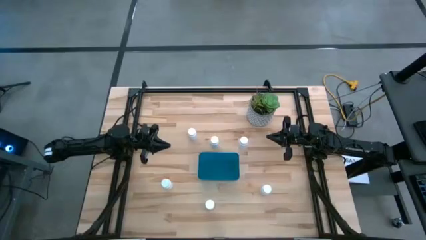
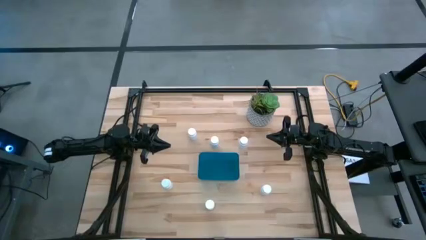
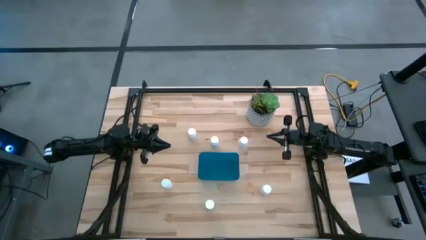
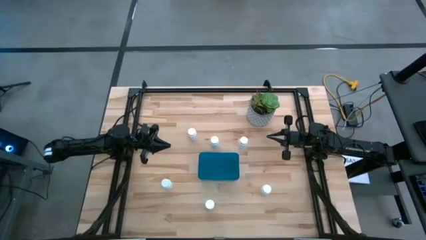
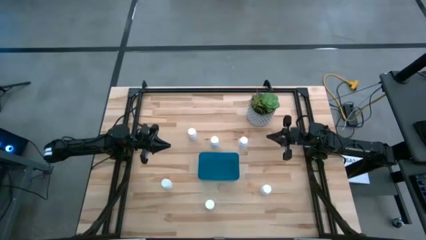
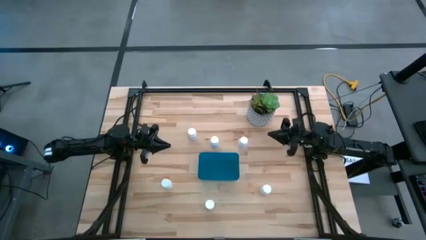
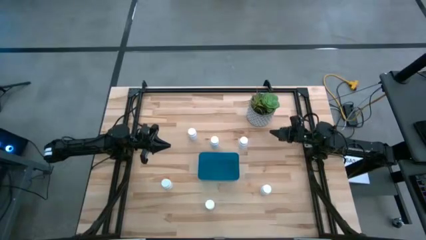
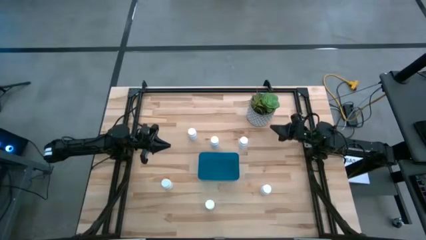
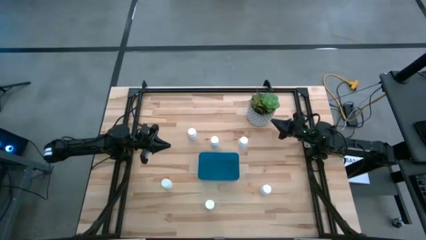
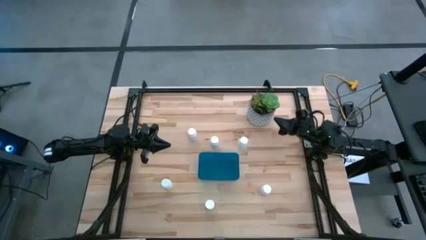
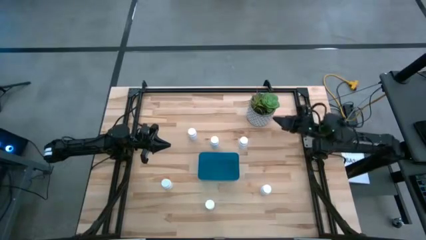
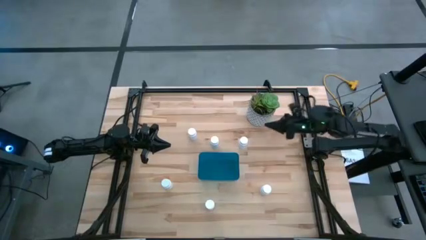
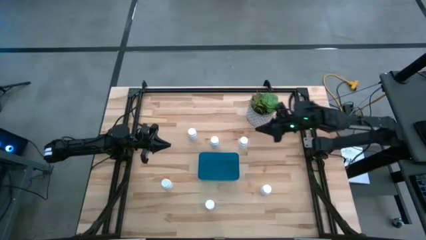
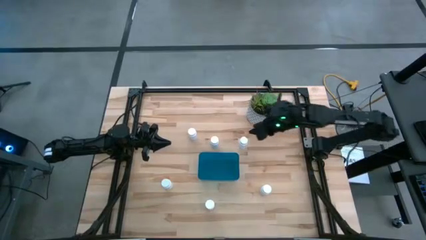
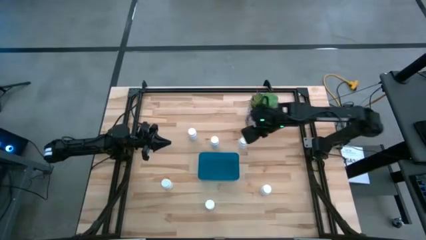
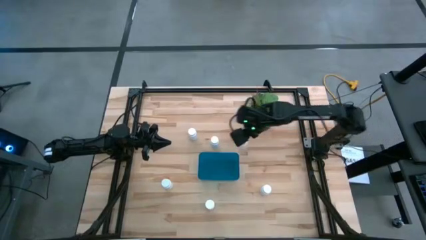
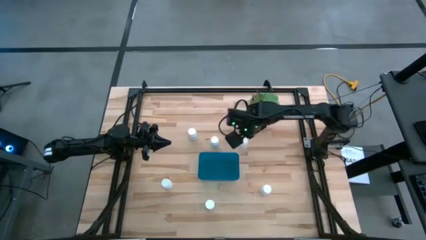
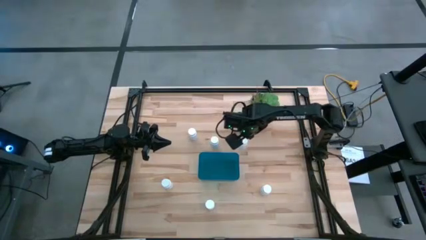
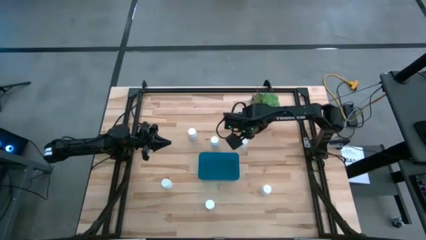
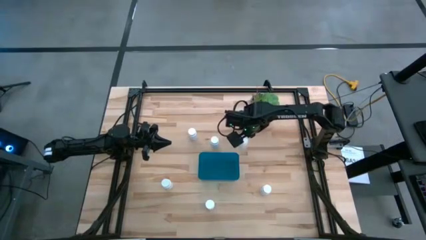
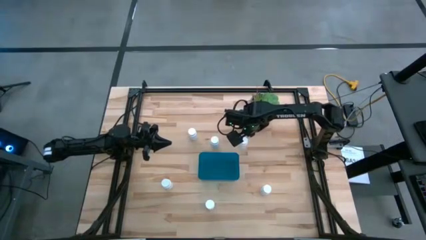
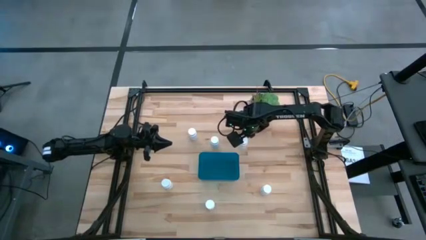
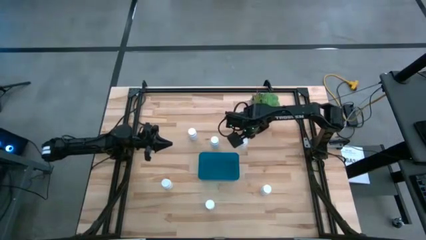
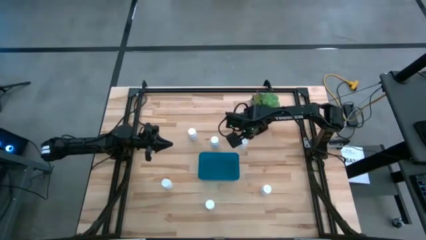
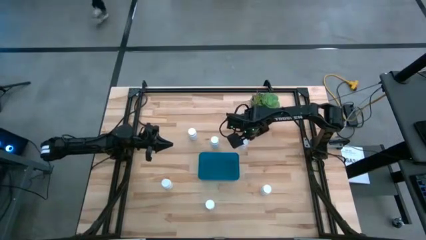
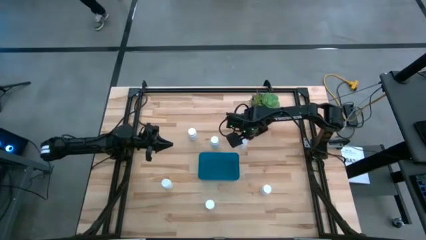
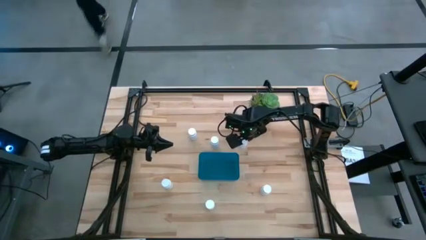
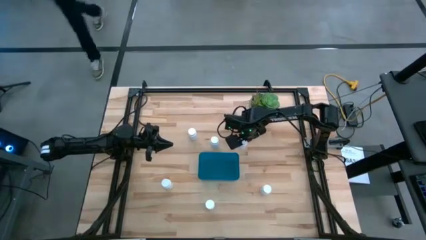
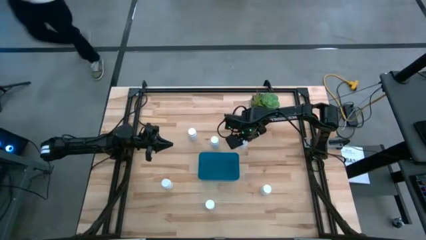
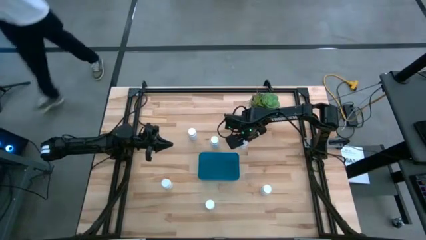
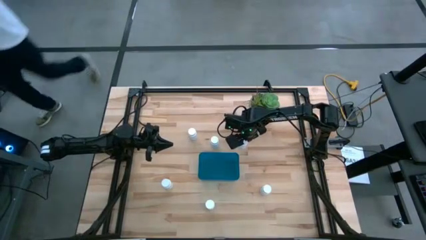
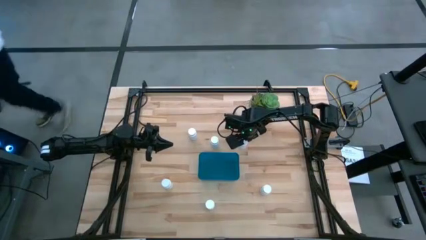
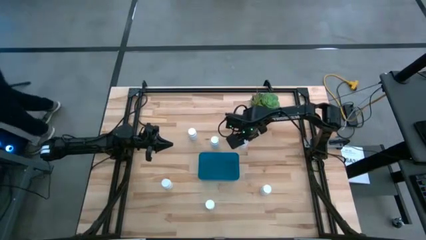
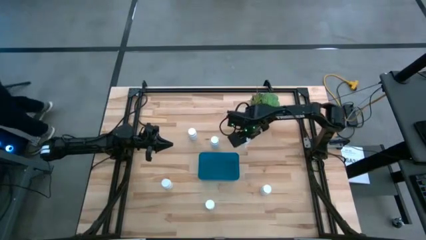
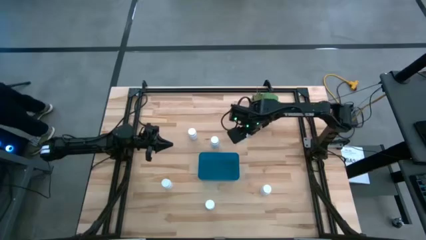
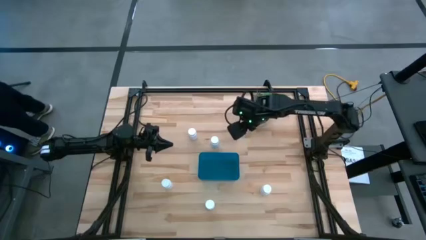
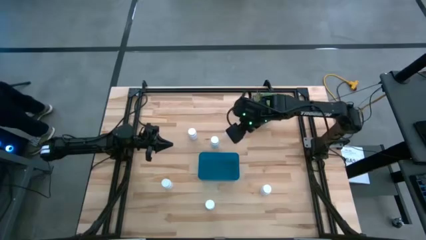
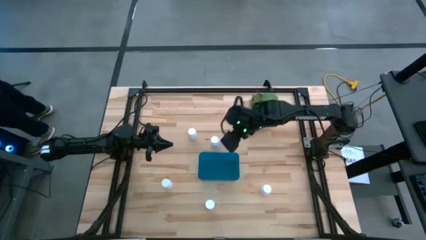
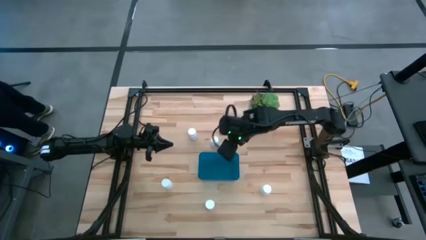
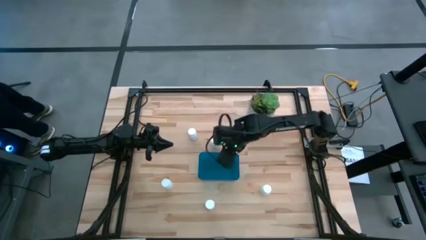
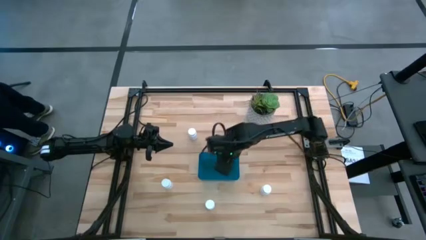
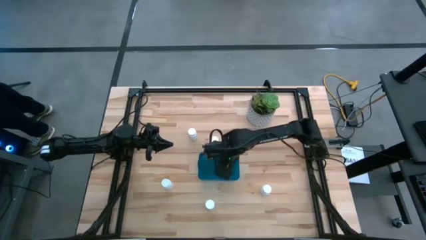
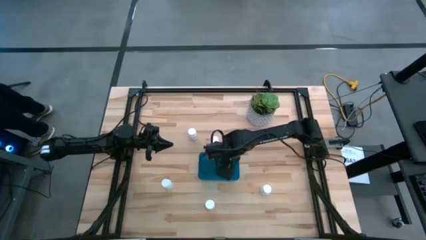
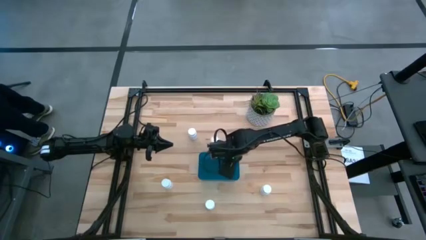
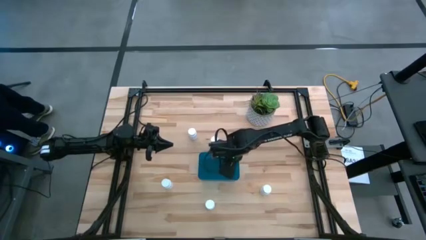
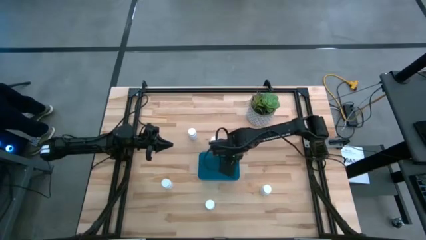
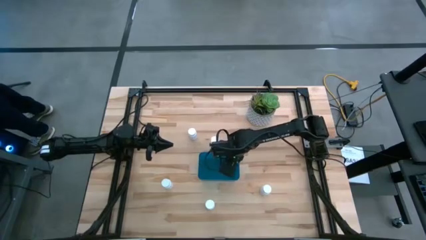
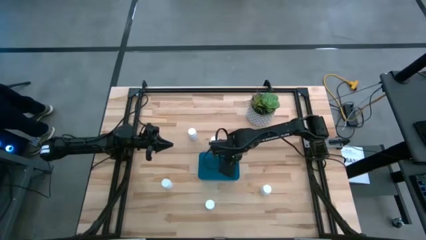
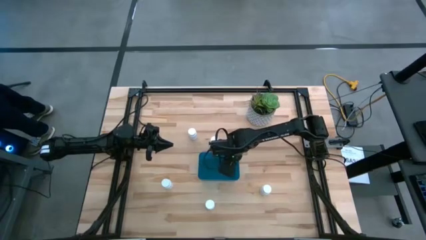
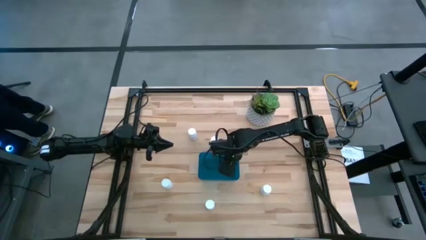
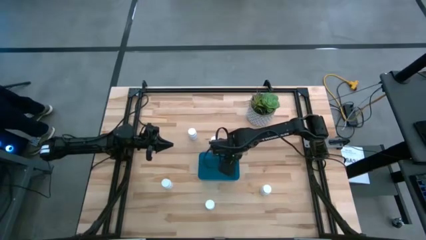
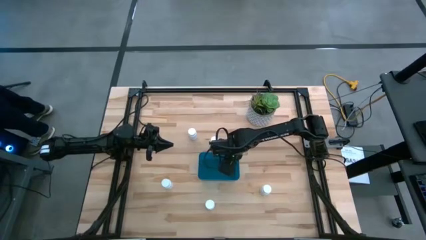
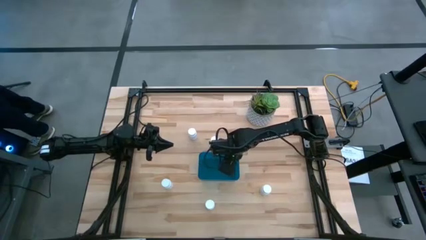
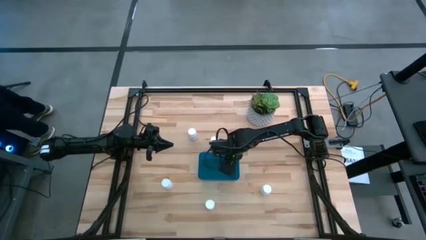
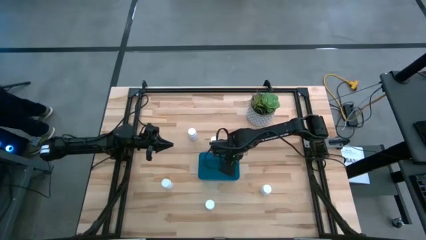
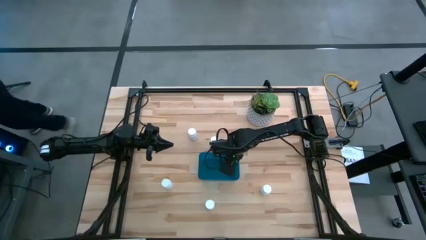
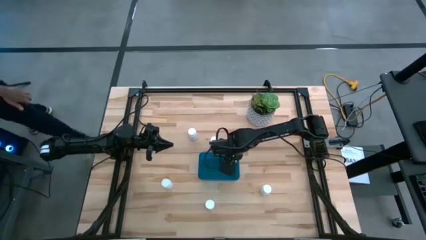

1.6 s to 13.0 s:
Task: Pick and place pill bottles into a basket
Put the white pill bottle into the blue bin
